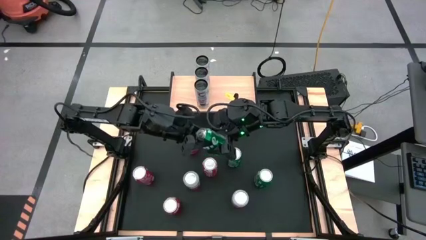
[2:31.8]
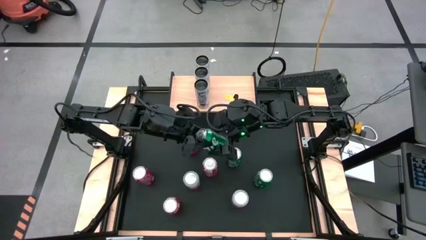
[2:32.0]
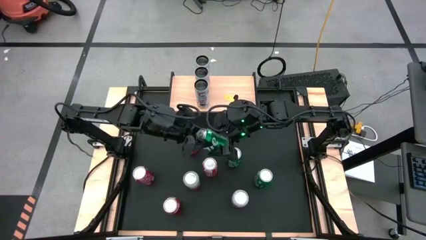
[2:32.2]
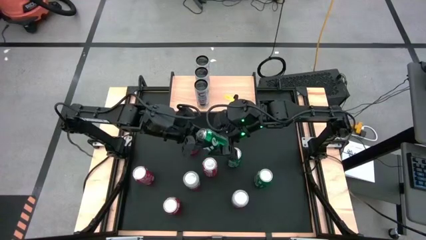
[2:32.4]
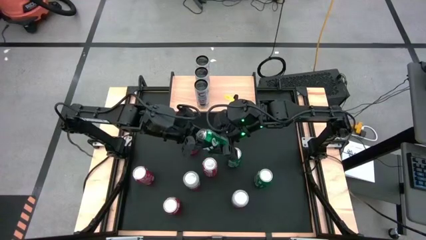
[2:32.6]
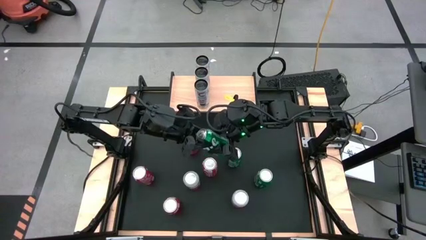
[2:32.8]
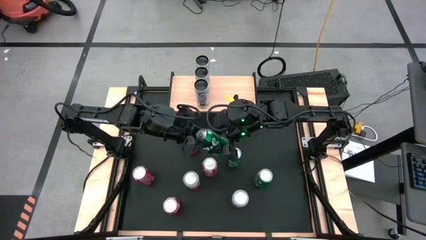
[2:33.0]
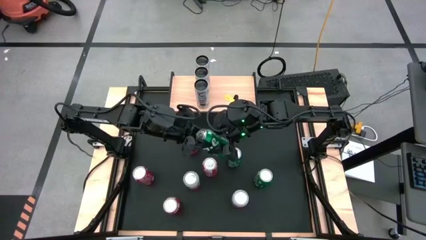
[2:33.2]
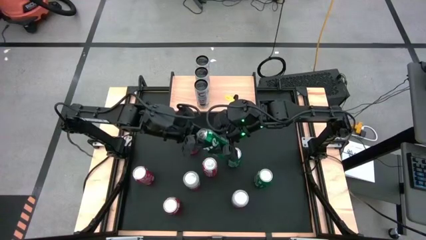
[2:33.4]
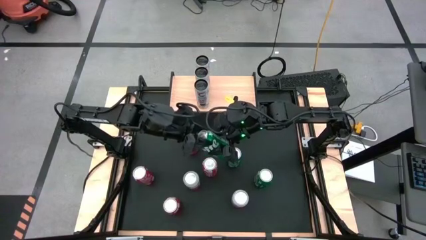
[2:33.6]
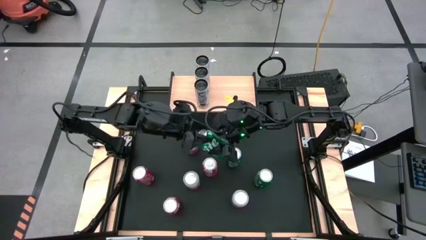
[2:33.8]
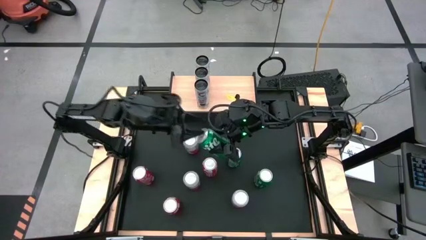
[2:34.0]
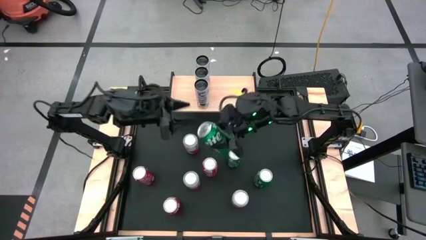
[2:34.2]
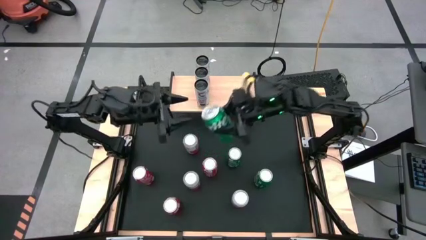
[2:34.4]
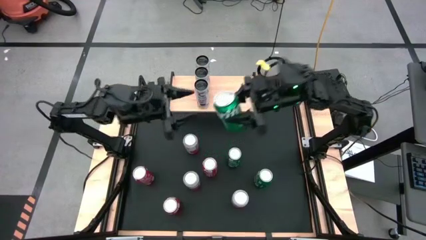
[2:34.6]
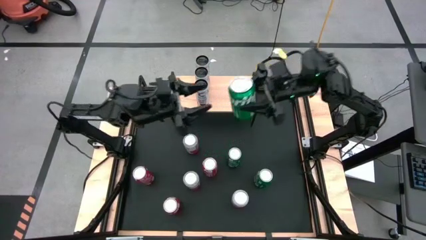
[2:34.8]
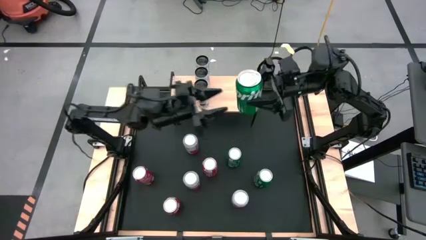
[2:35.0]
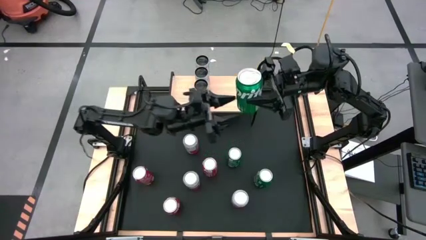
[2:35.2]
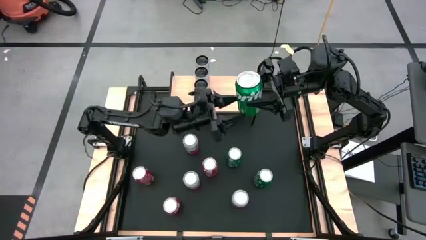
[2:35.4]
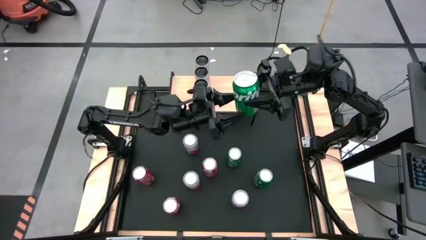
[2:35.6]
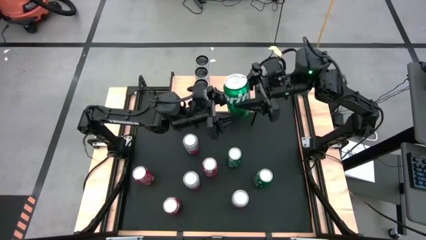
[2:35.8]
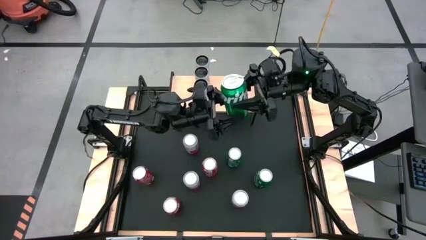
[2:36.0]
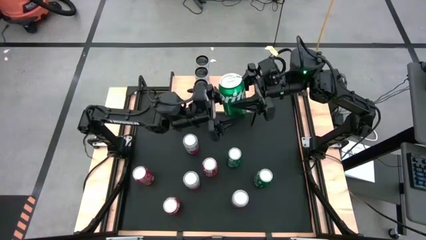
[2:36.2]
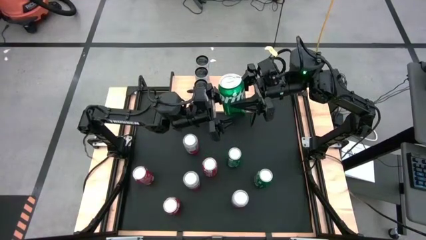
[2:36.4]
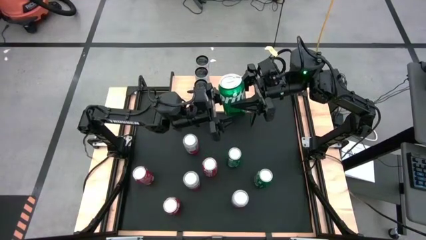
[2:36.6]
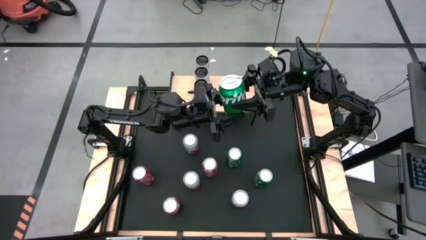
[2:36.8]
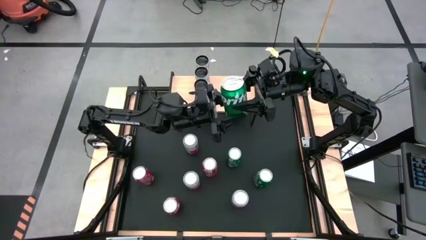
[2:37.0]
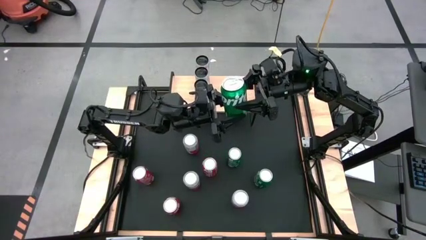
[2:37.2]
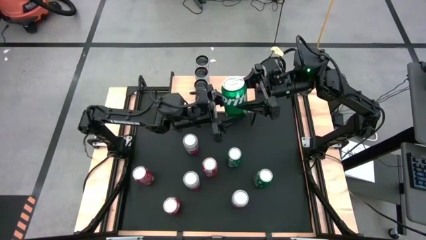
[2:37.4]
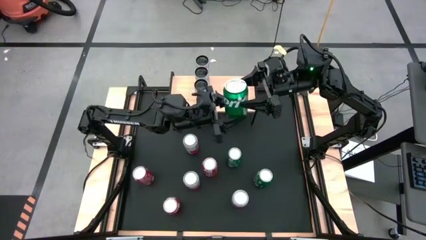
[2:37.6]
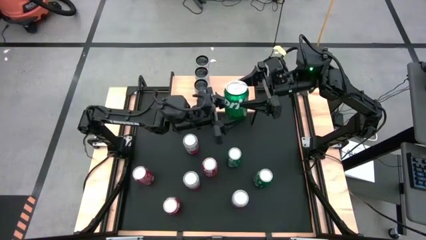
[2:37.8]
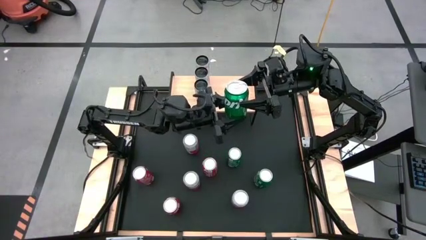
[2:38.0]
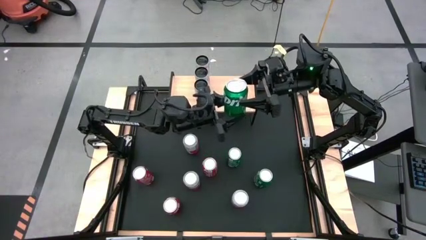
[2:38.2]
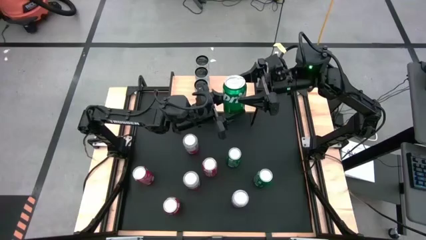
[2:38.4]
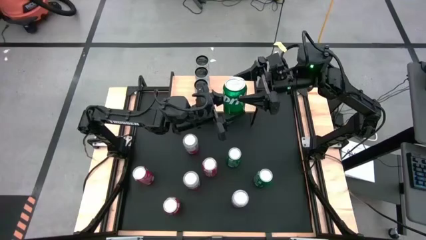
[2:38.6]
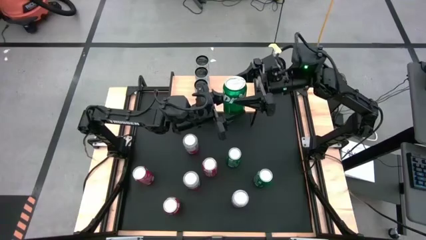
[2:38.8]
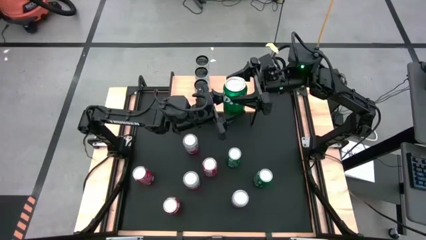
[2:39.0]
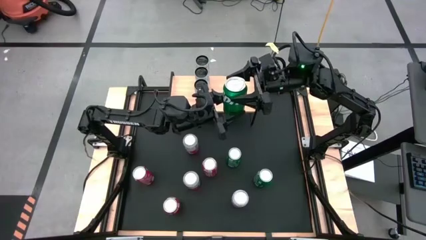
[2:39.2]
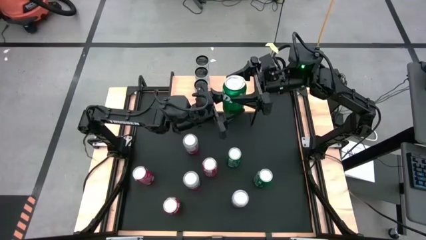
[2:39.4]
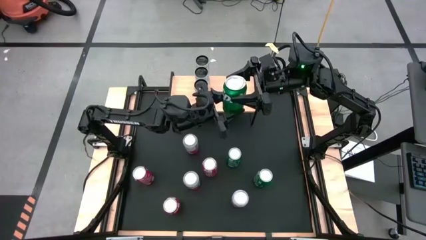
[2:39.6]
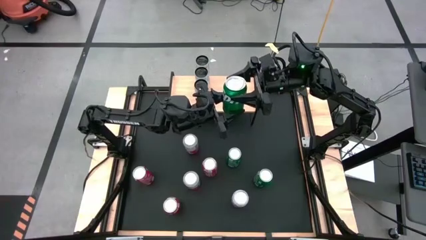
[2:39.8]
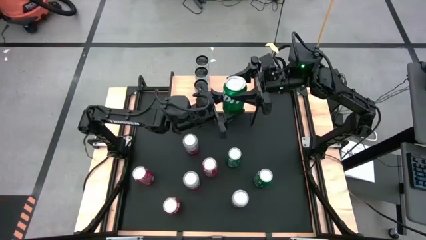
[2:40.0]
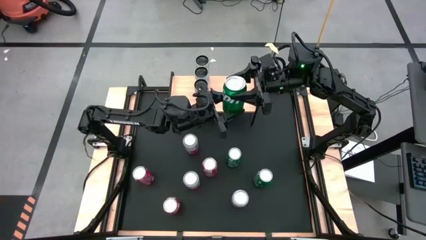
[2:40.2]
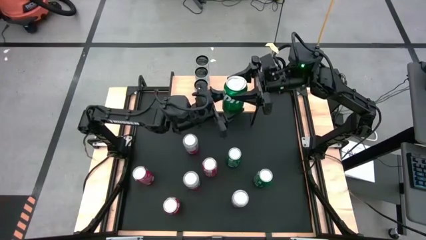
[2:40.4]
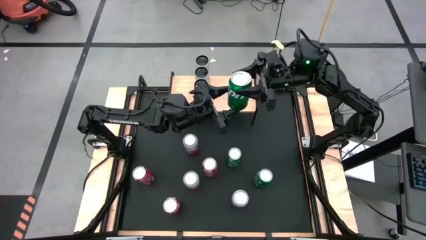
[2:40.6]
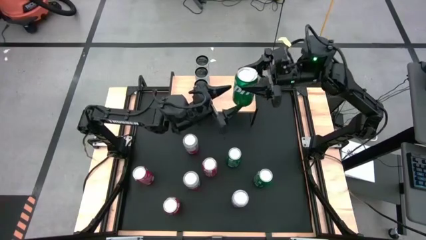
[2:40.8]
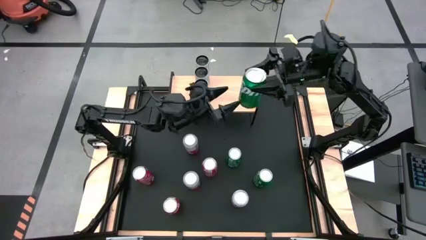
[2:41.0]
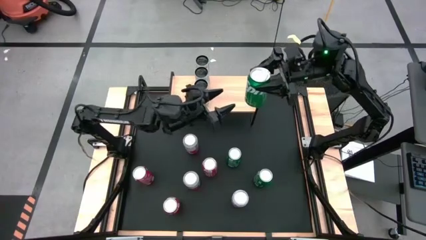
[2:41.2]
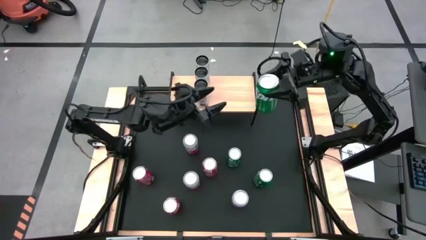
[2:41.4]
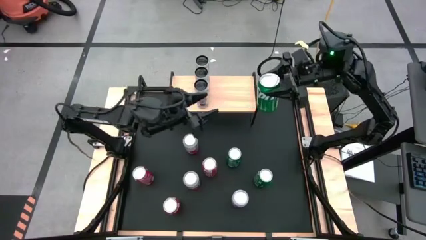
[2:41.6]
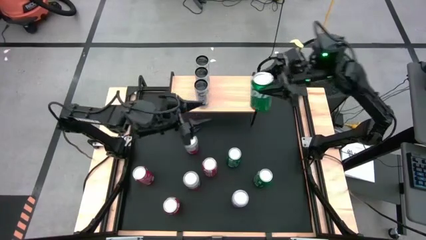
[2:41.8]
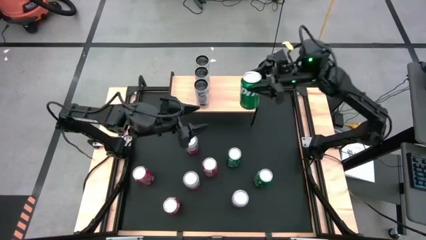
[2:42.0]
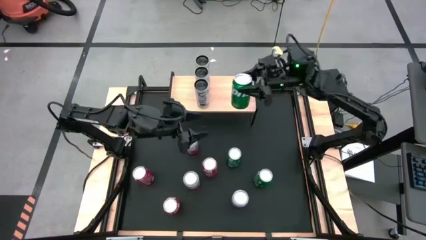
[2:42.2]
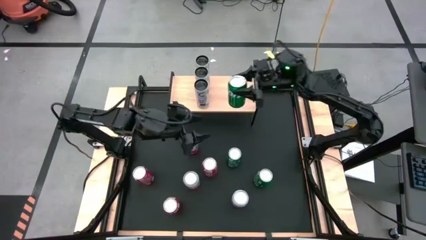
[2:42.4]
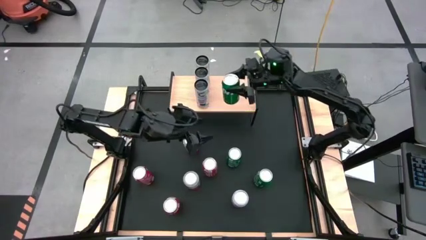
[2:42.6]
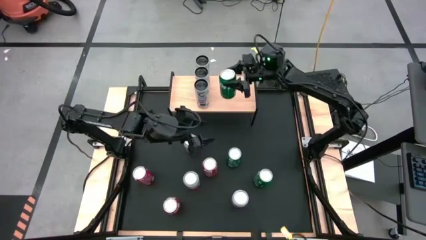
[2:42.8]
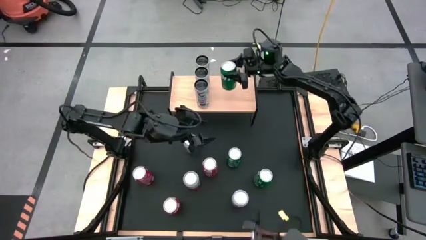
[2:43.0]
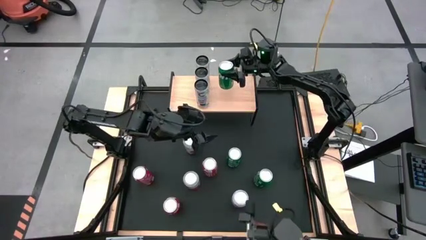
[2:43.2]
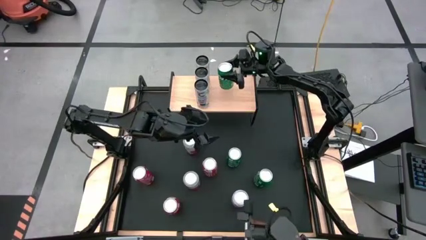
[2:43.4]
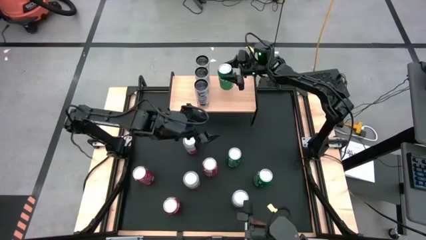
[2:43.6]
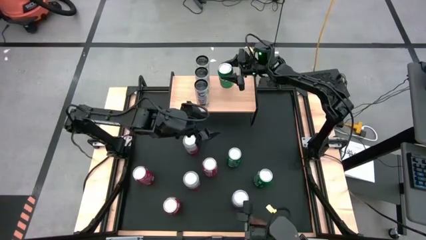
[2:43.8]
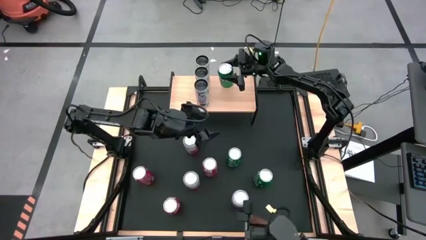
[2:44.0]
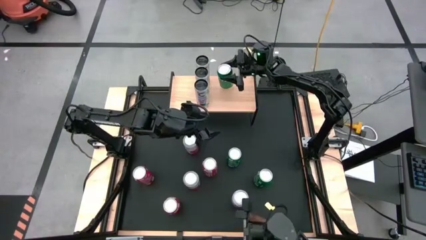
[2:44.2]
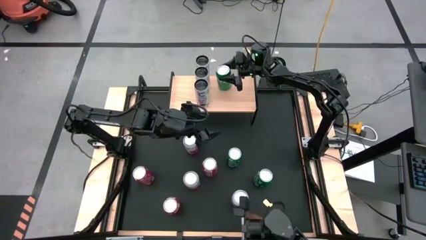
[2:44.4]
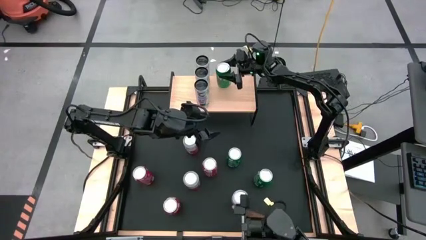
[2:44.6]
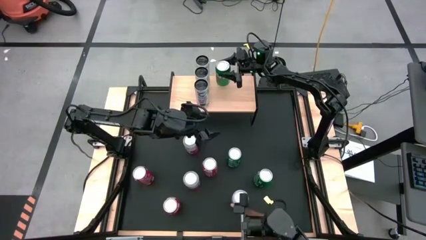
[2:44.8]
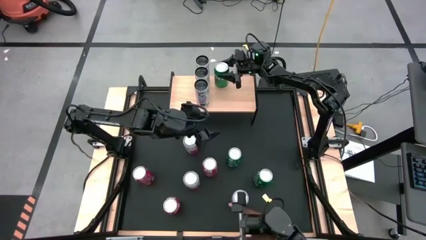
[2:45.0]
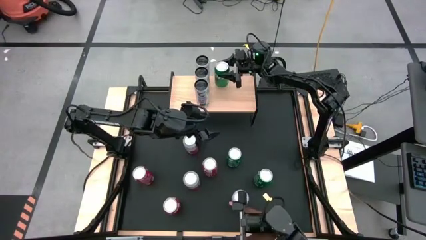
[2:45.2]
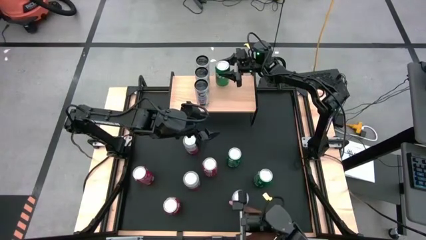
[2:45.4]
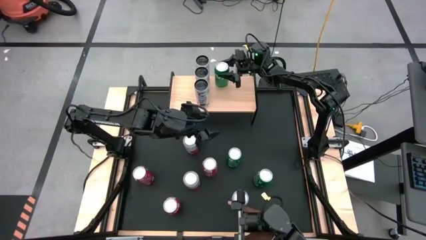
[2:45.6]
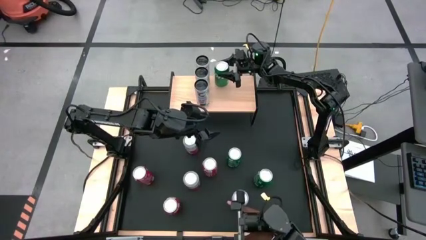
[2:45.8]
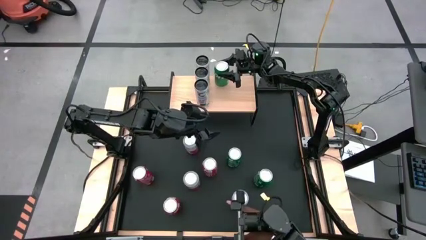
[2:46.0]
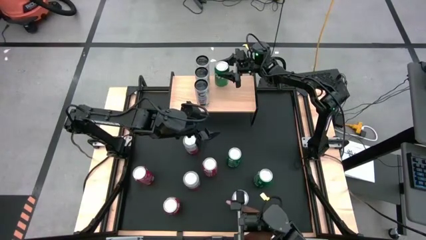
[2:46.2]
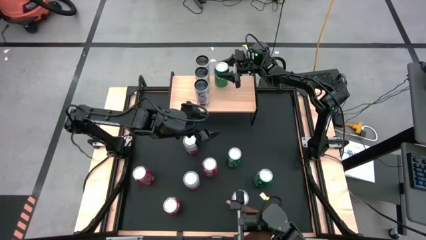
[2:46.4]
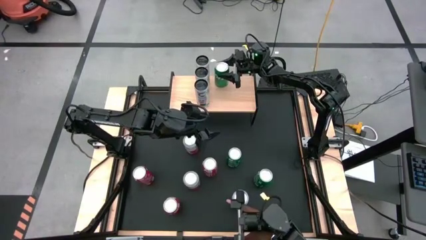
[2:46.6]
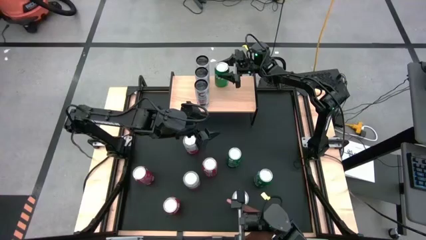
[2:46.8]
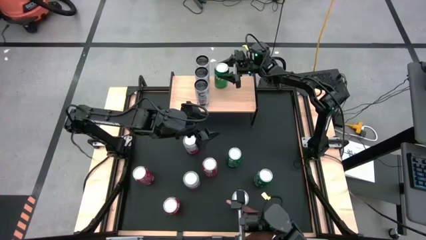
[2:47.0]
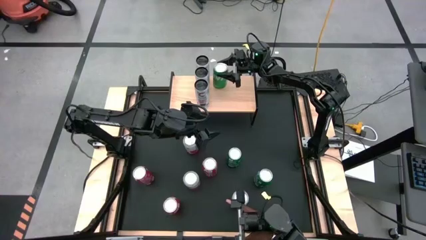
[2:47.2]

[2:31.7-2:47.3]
Task: Place canned beverage on shelf
Put the left green soda can on the shelf
